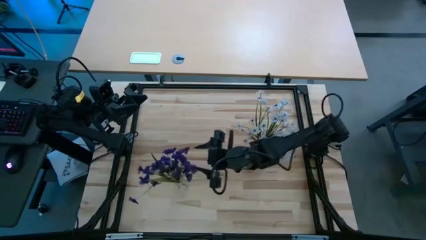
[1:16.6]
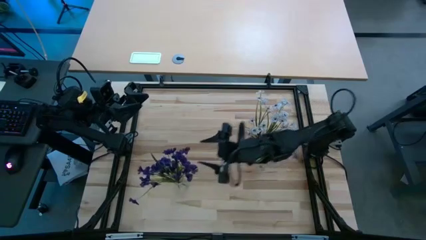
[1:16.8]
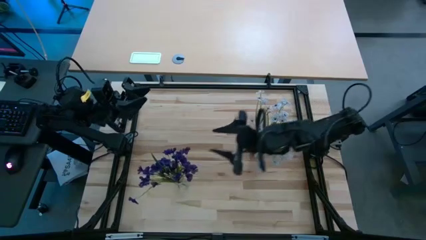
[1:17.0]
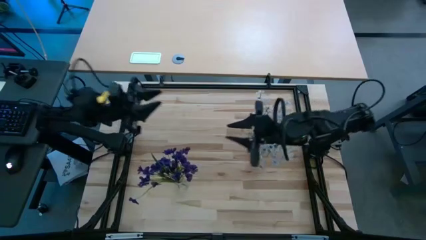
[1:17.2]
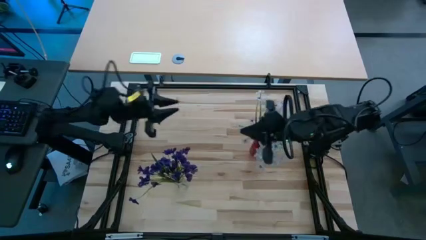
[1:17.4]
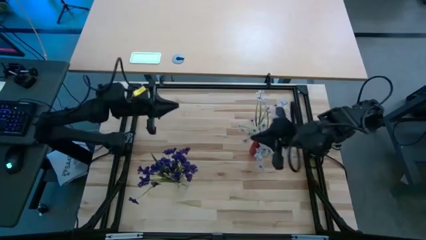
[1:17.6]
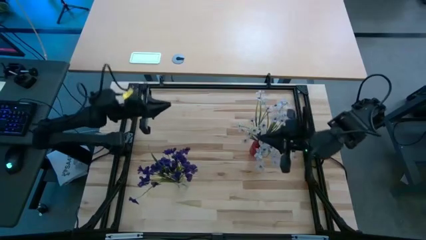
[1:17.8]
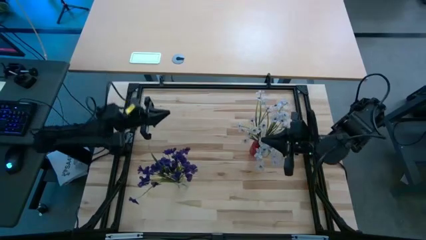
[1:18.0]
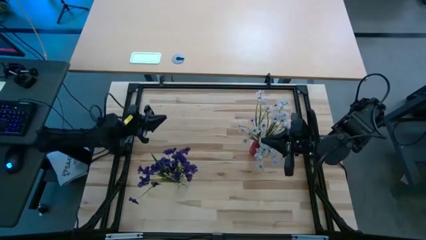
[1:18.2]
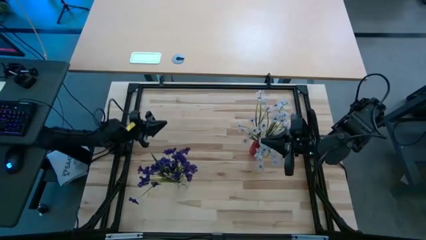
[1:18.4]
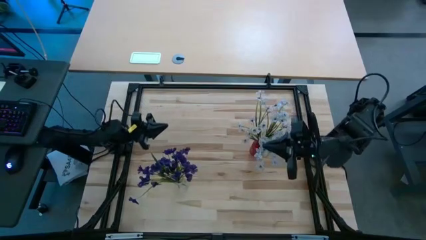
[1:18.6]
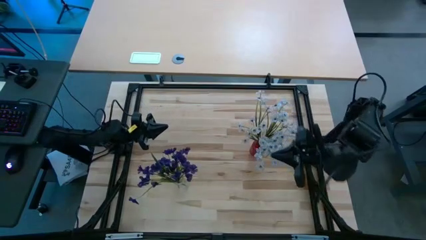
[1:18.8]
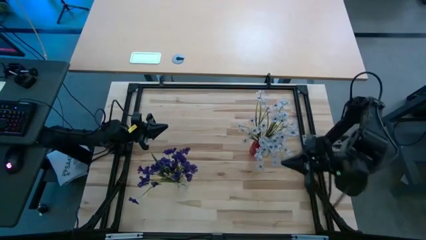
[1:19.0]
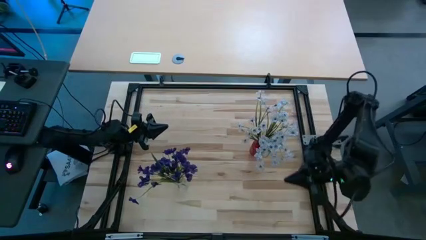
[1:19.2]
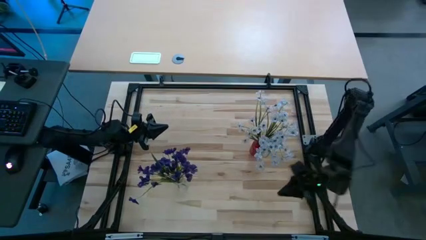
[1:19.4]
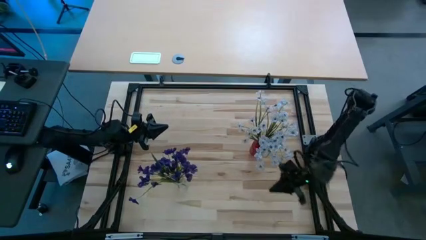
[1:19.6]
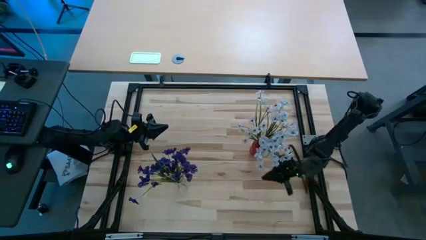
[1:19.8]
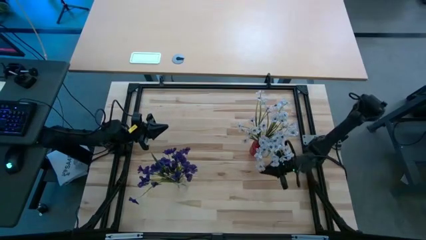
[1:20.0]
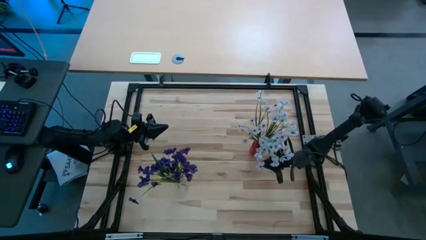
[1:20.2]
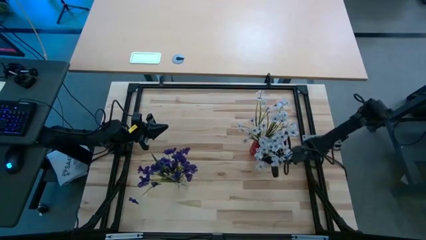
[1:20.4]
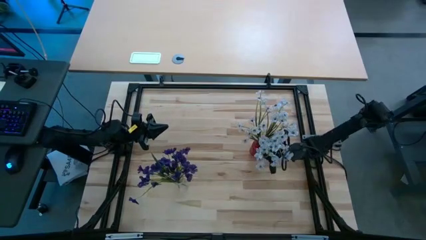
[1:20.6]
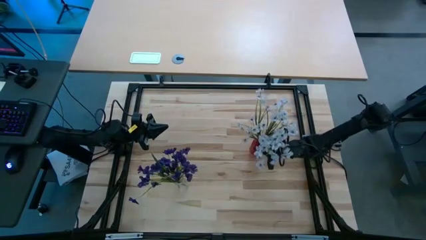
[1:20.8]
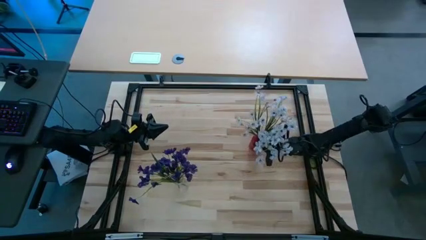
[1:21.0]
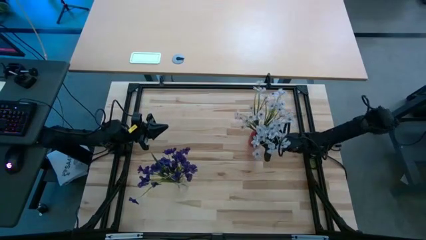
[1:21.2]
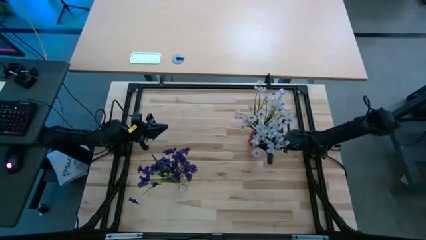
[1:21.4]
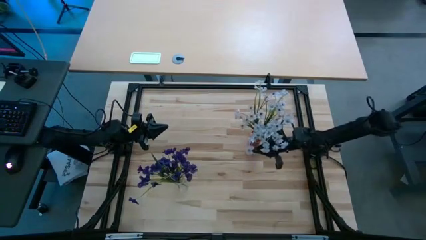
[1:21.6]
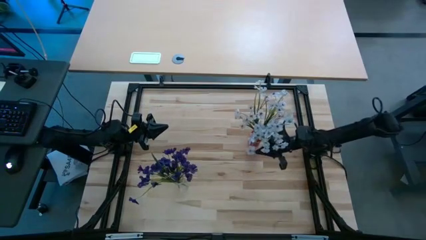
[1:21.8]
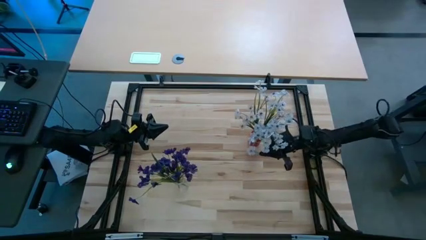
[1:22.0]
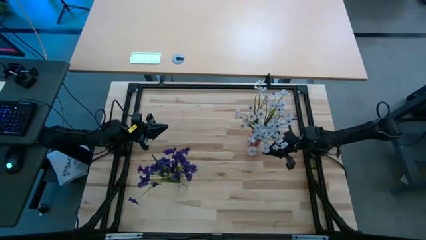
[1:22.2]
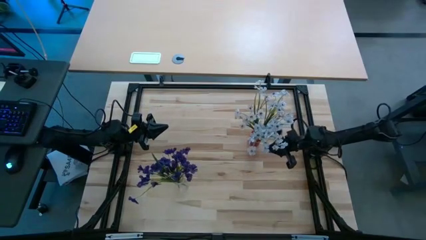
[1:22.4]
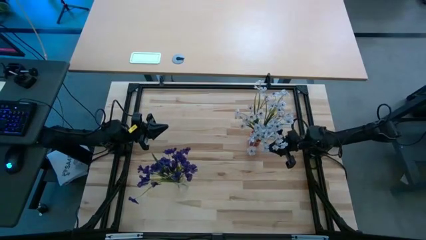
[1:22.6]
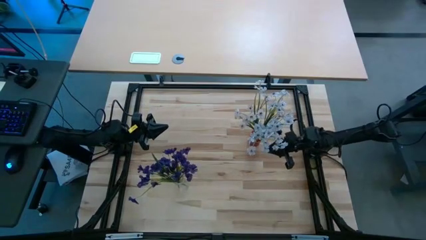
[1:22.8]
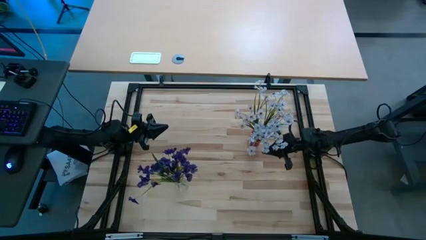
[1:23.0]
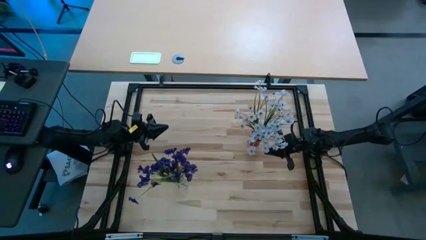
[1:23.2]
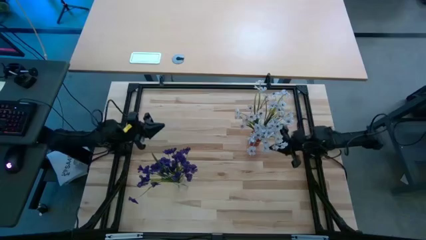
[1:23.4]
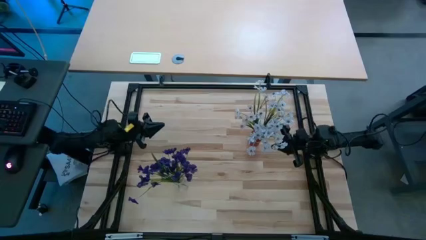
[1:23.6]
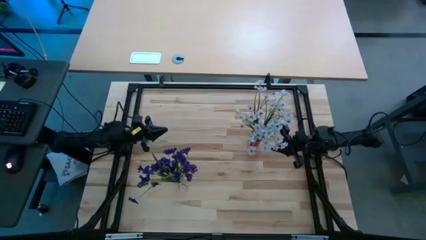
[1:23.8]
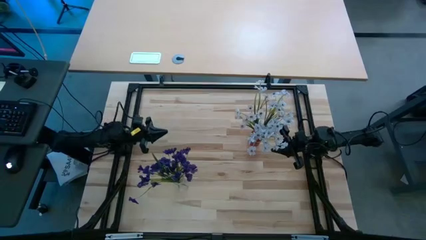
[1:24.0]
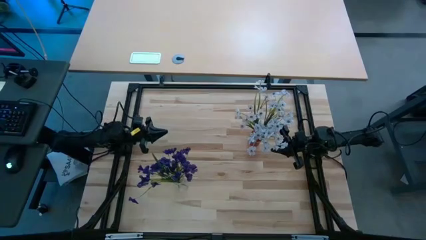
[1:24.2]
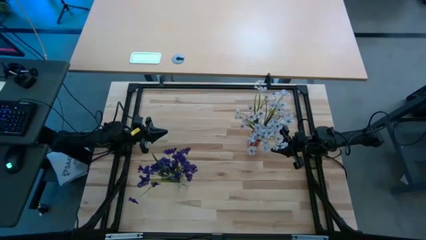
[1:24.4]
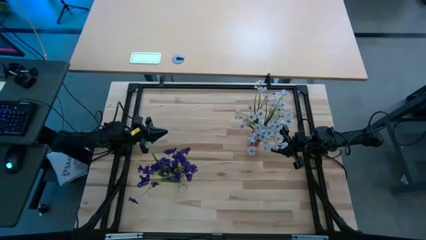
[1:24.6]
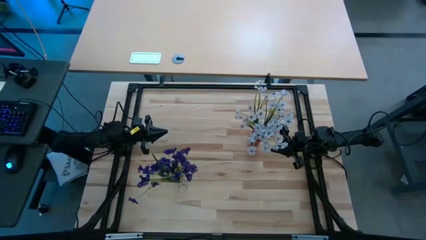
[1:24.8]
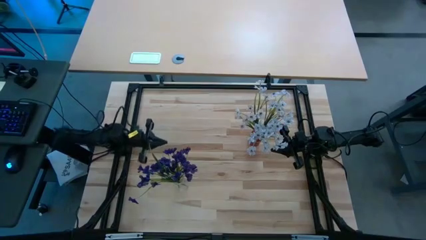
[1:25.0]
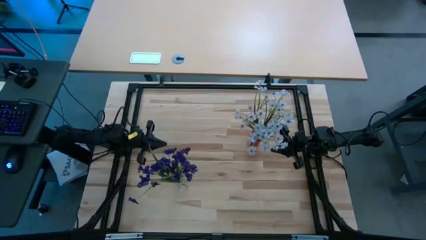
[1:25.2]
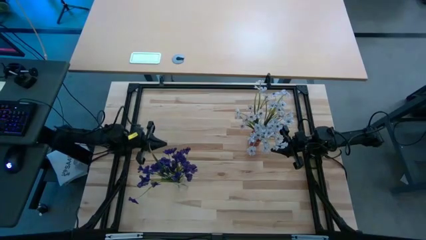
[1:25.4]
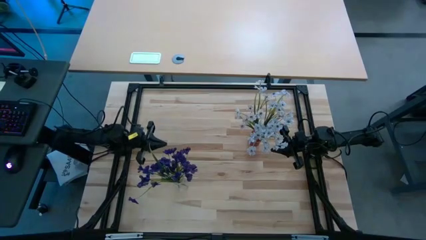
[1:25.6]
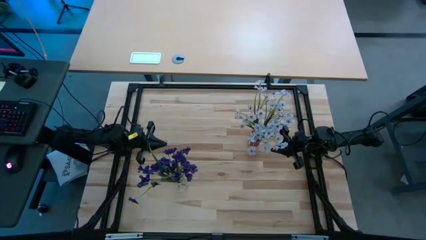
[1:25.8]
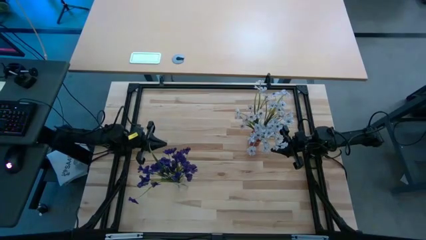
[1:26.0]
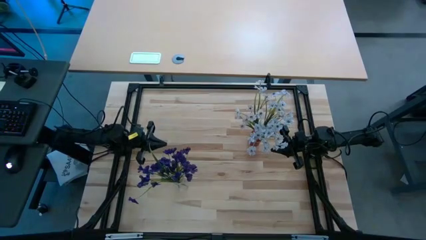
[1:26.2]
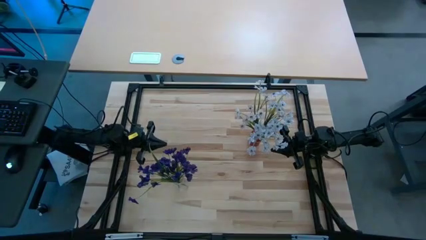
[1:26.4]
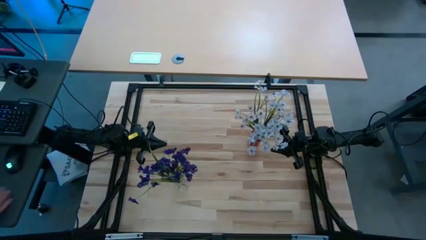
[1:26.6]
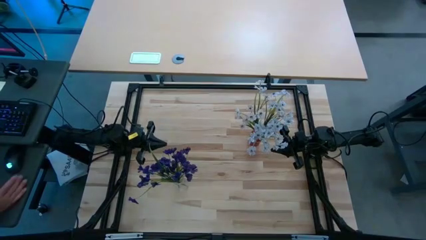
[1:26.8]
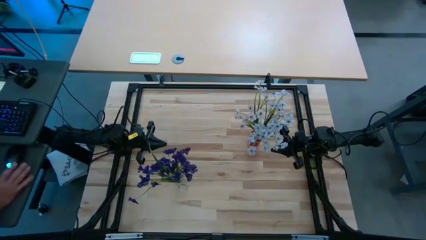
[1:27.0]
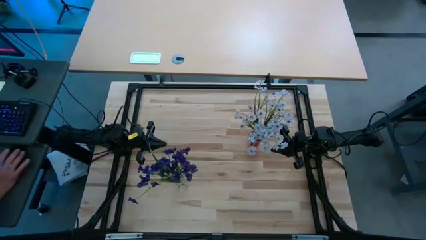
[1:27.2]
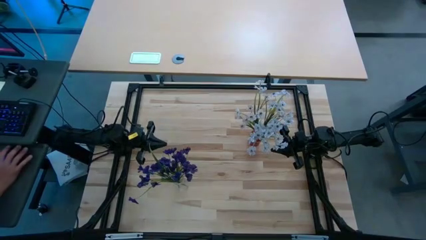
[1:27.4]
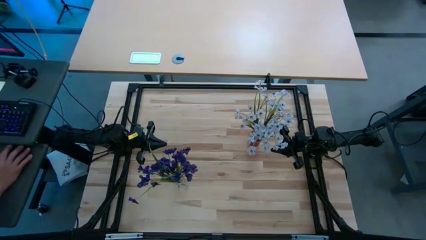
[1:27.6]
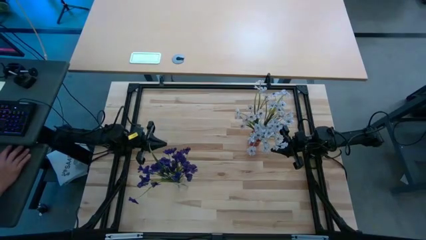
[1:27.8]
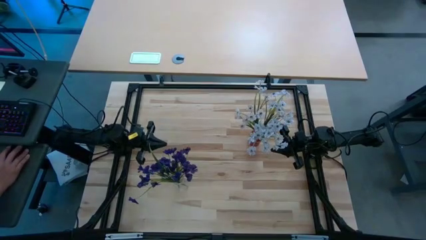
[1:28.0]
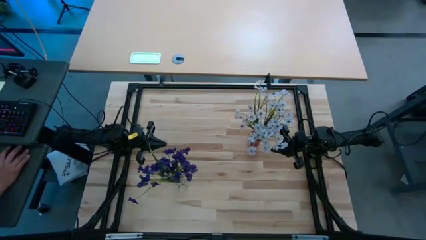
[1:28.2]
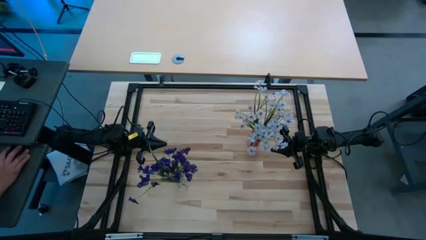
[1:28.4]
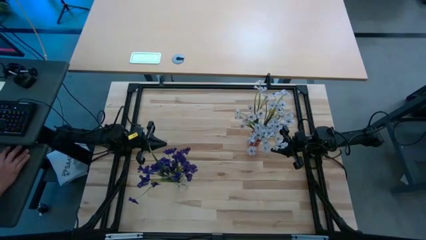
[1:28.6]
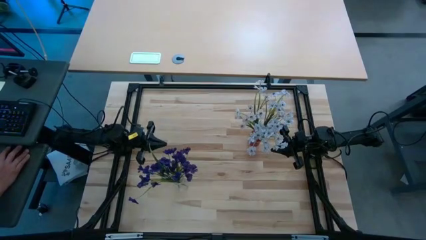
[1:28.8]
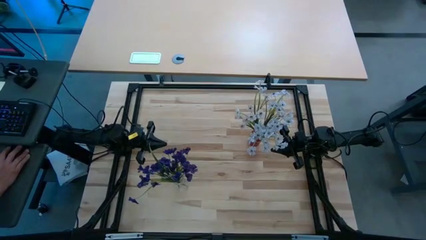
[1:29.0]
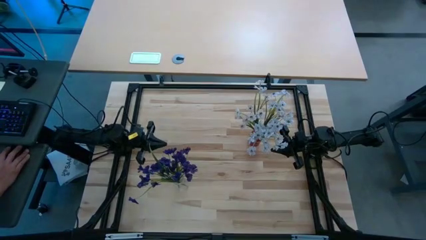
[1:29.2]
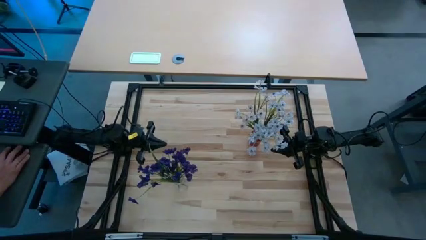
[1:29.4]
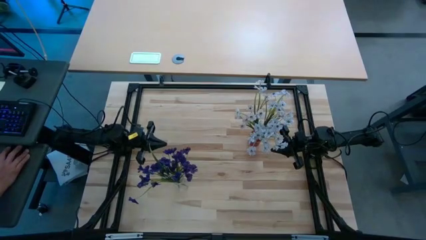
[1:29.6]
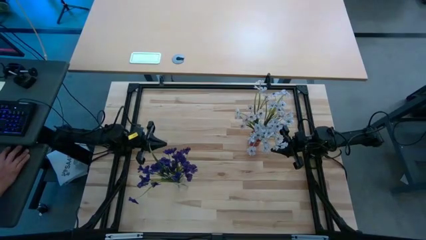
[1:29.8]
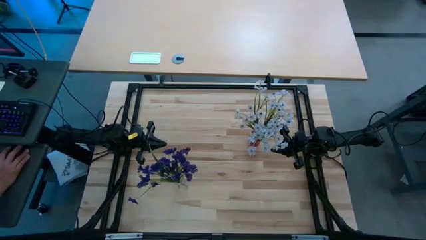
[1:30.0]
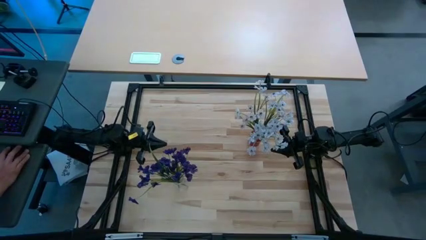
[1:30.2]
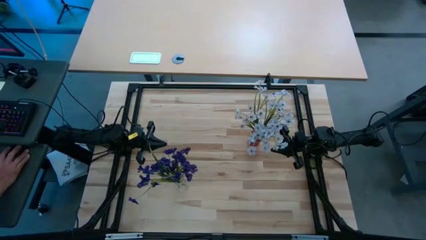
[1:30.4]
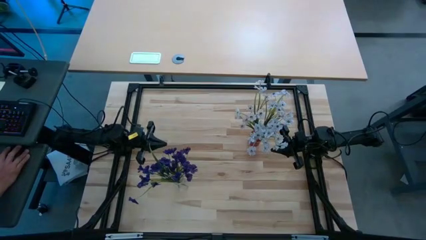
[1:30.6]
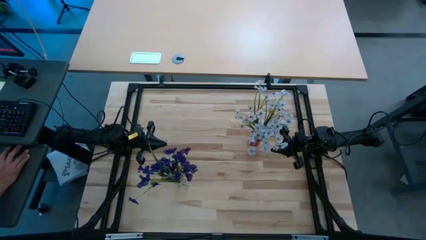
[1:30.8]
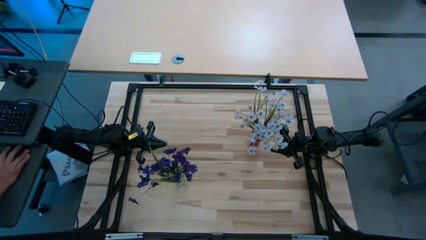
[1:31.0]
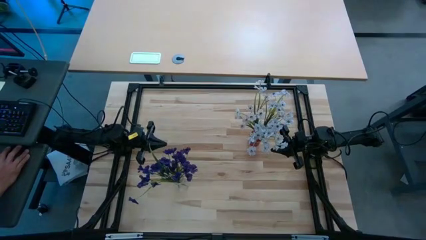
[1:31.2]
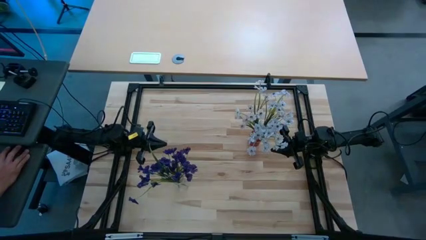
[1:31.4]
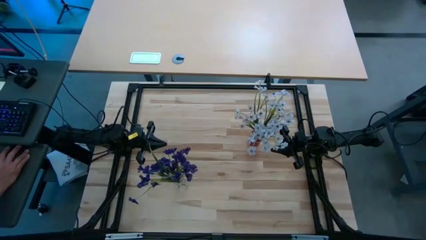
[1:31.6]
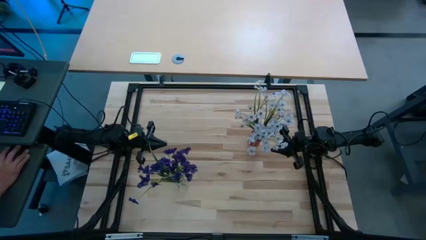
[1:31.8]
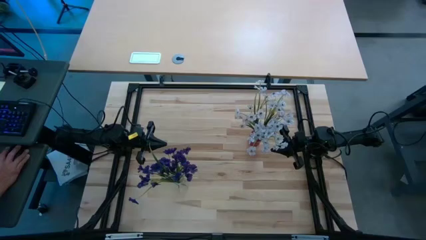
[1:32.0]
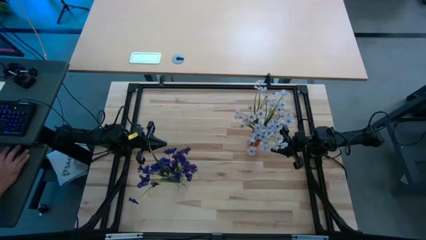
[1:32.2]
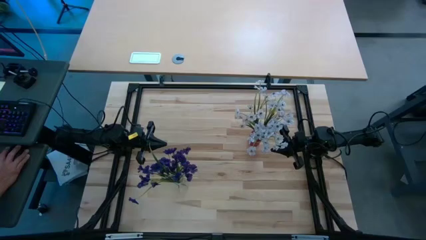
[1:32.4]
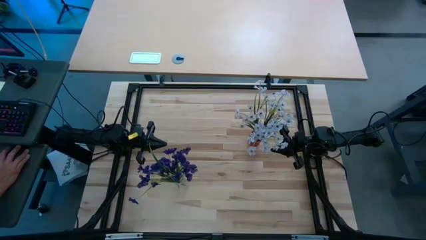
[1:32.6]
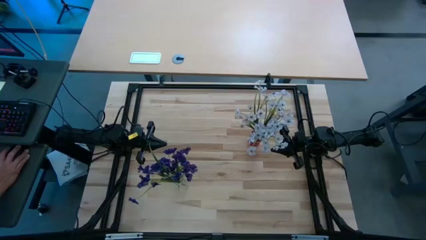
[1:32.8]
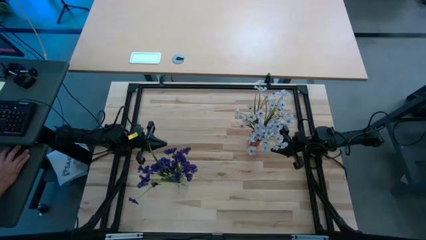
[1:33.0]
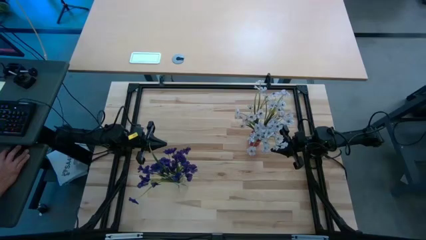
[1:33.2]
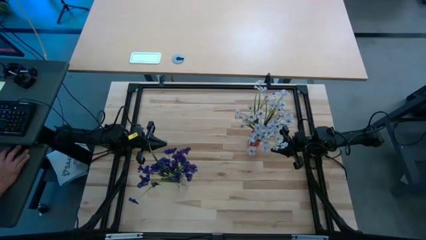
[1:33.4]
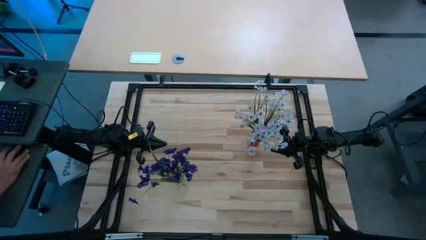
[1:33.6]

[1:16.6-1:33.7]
Task: Sort flowers into vase by color
Return to Home Position
